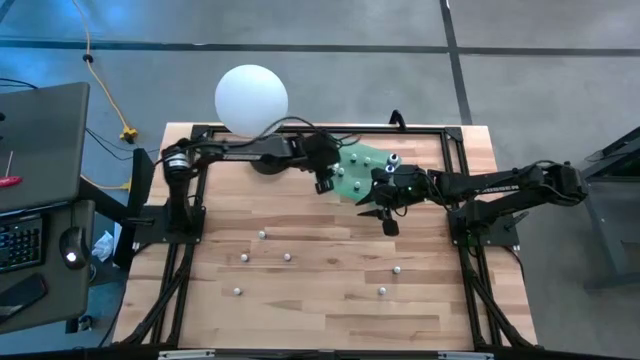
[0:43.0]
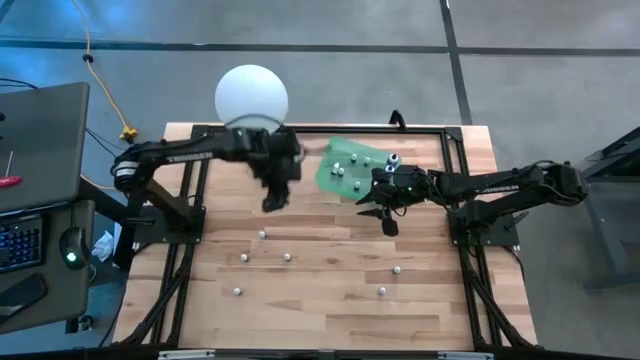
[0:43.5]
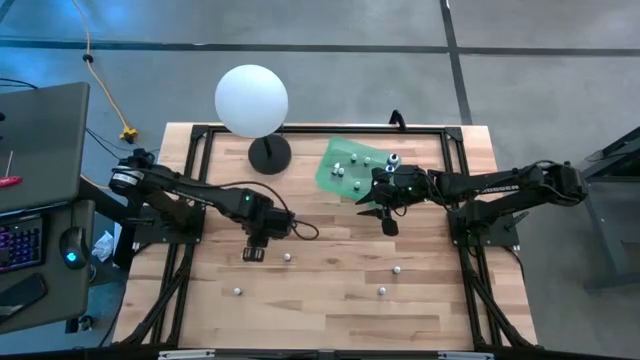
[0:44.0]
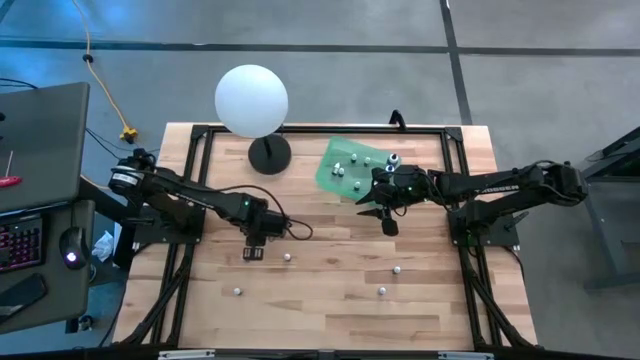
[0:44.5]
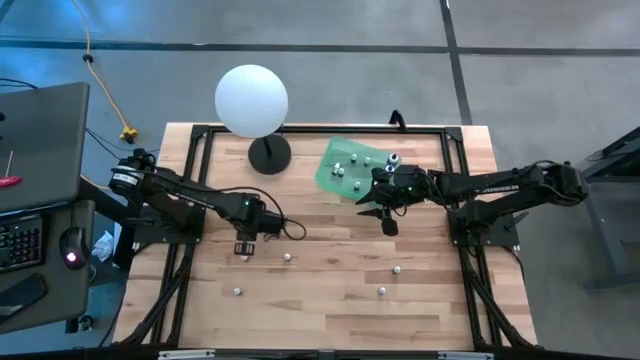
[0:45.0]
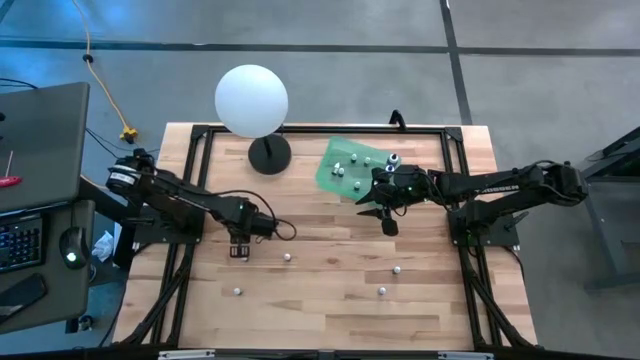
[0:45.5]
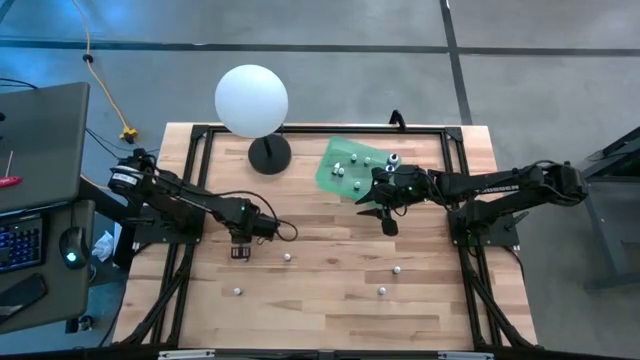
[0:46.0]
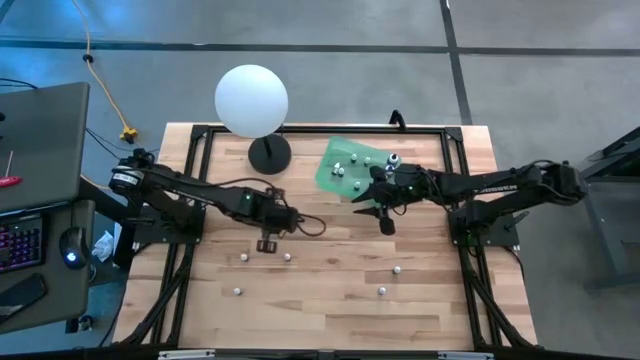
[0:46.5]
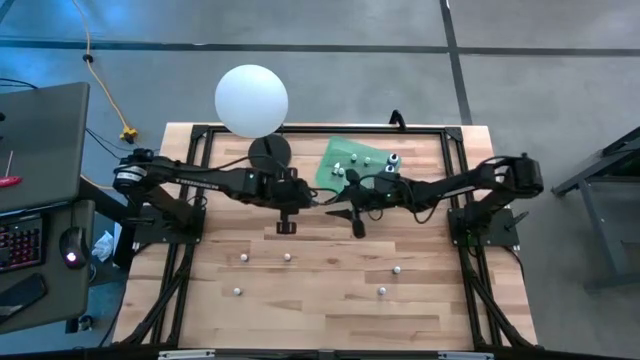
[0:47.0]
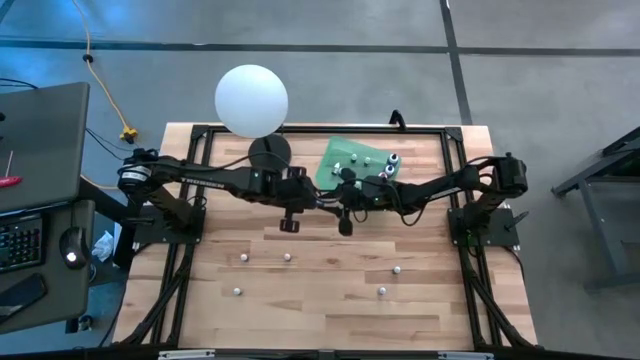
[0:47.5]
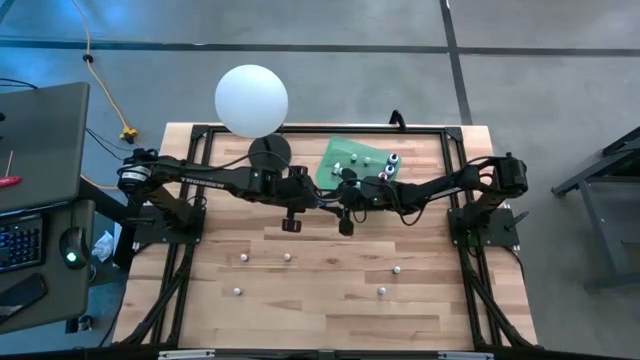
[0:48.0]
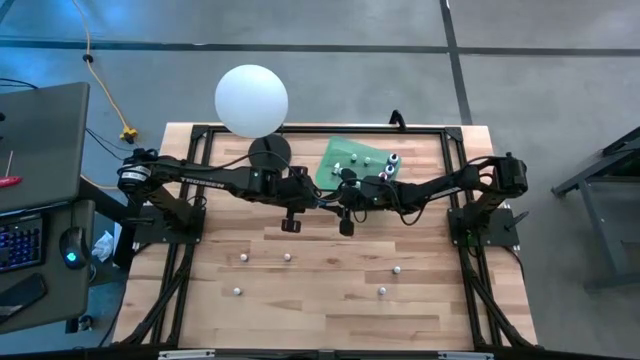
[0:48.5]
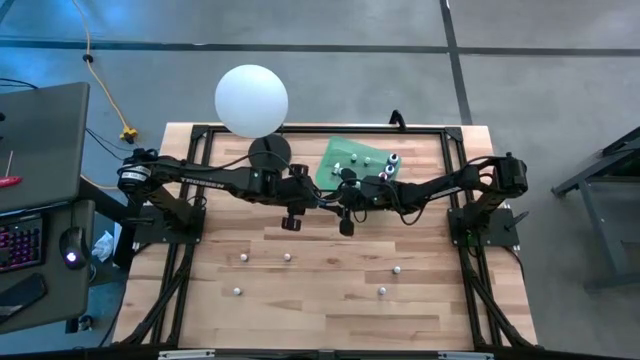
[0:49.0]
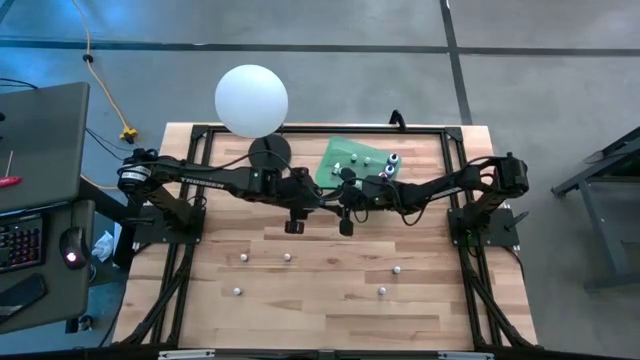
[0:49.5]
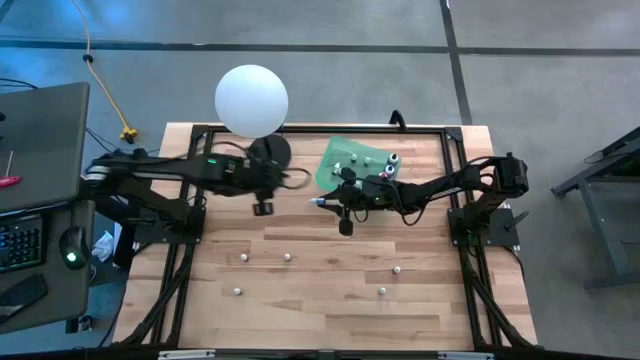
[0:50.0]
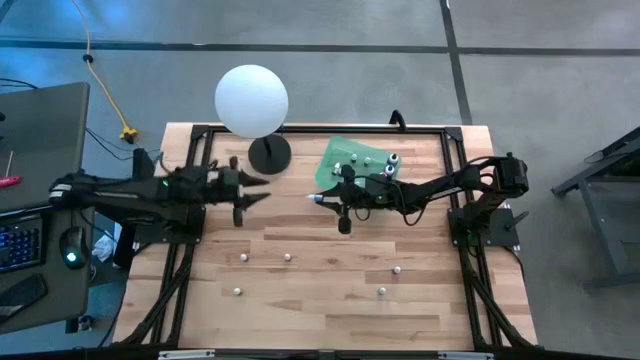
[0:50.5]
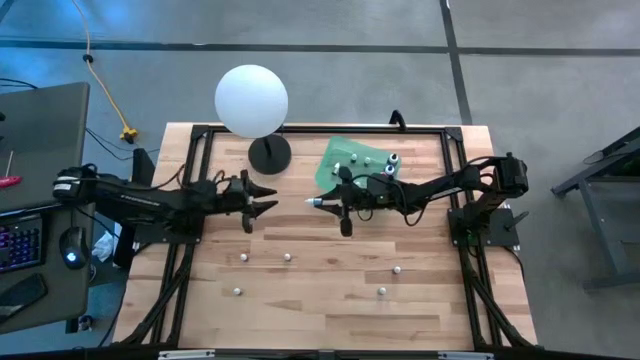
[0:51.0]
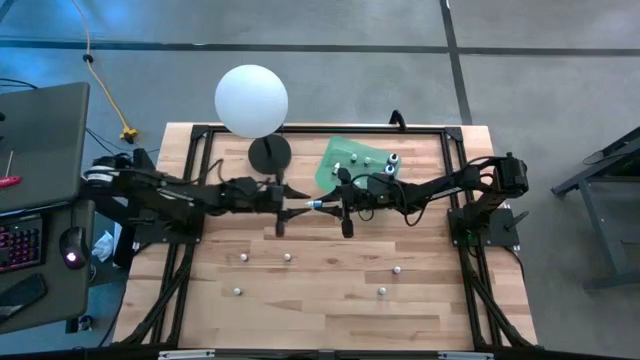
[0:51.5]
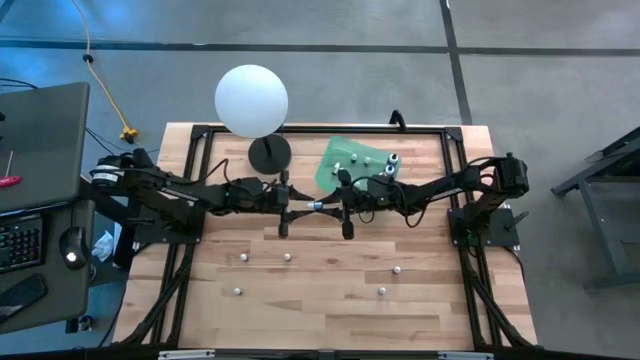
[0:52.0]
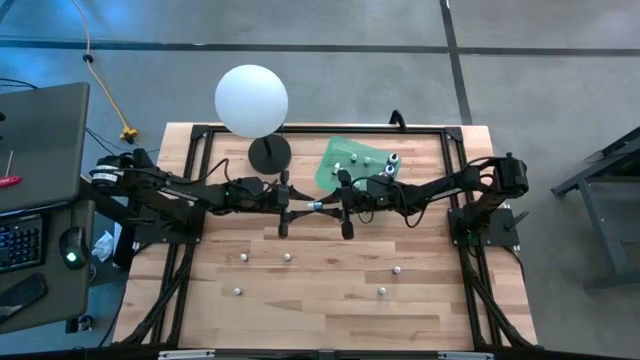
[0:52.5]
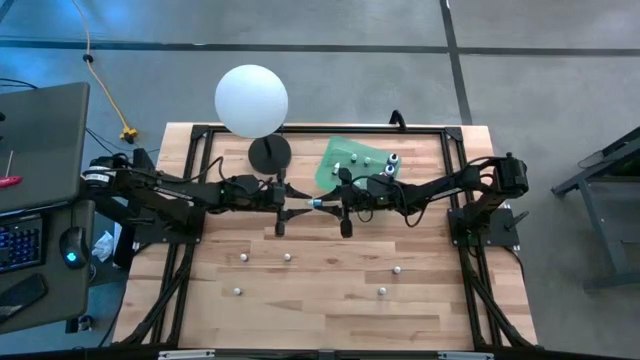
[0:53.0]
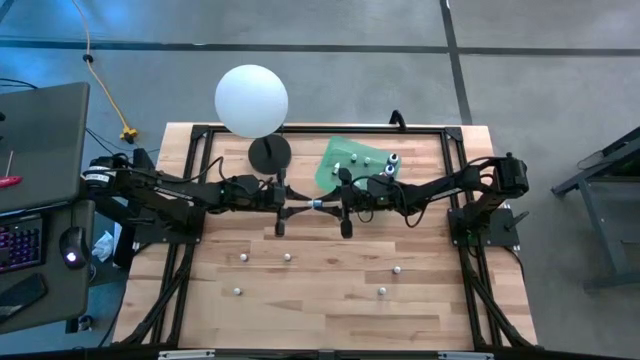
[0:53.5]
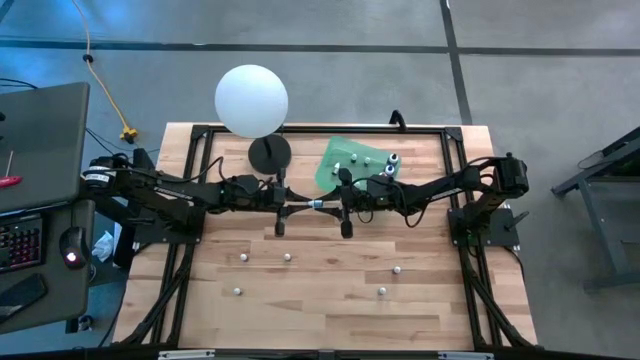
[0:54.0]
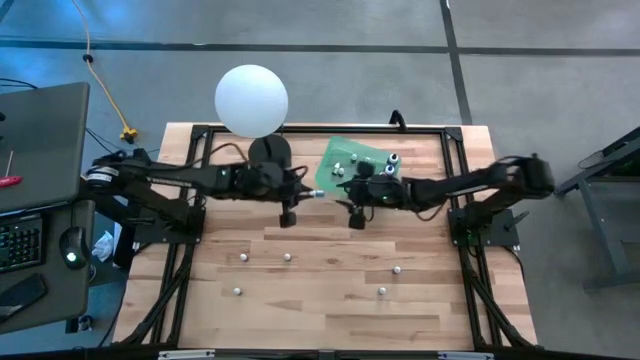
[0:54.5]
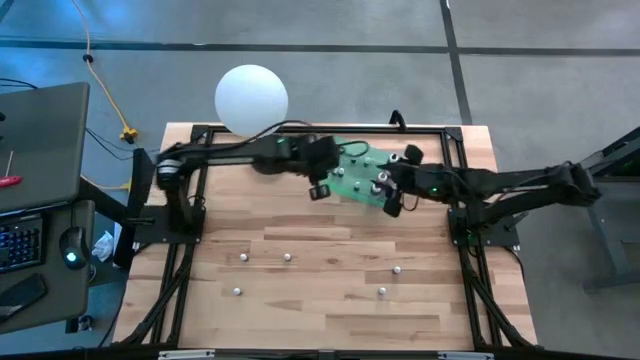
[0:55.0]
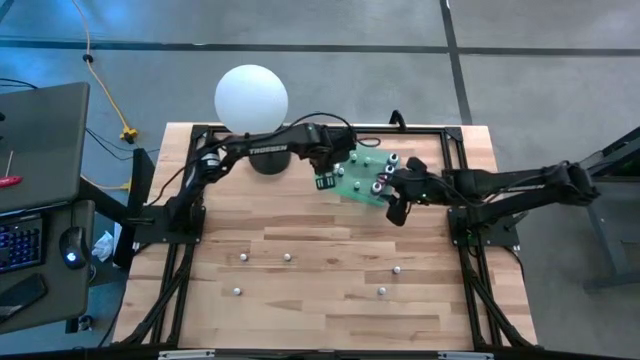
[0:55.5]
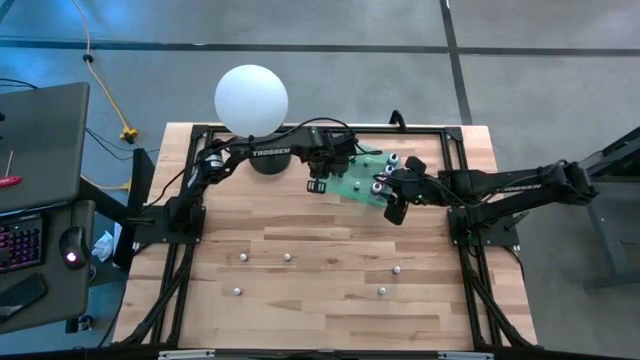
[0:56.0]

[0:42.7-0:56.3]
Task: Pick & Place food coloring
Put the small blue food coloring bottle into the green bin

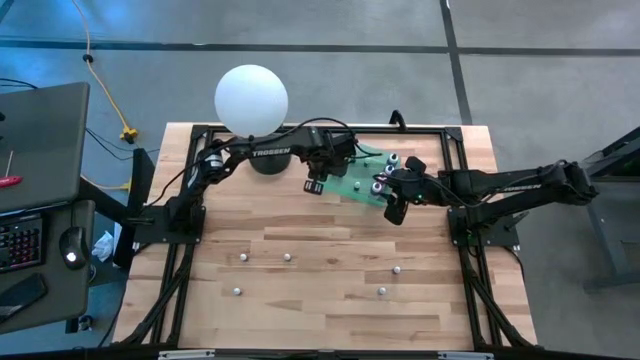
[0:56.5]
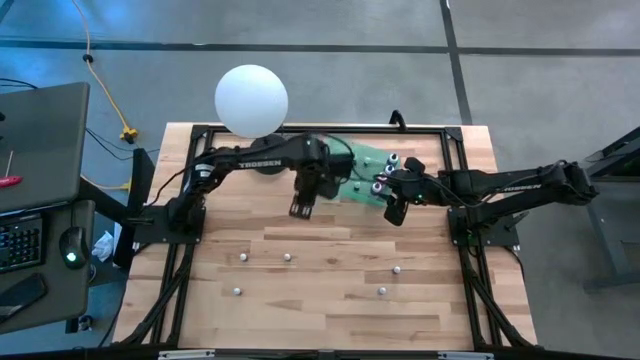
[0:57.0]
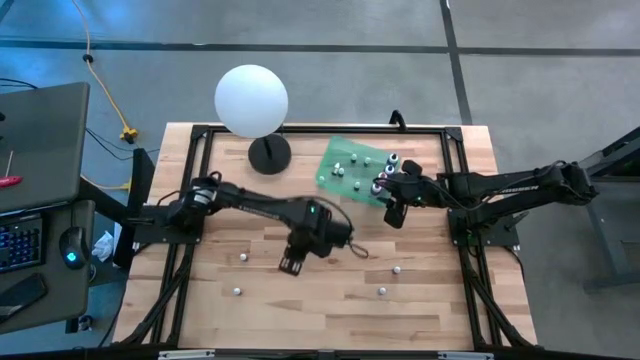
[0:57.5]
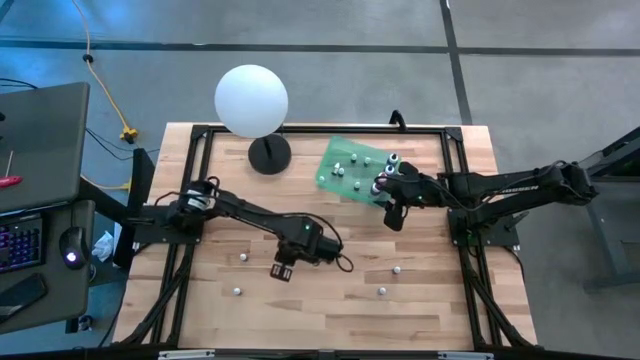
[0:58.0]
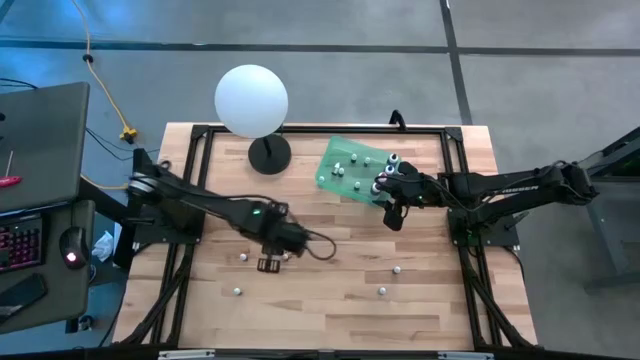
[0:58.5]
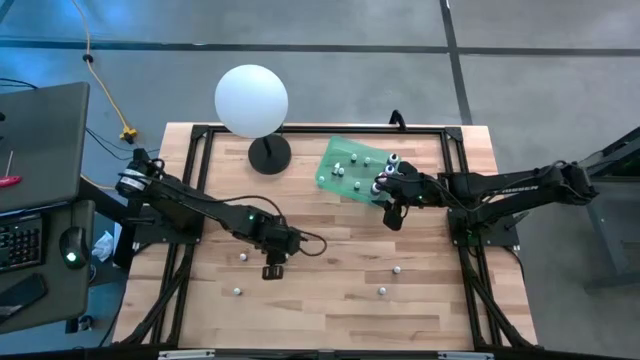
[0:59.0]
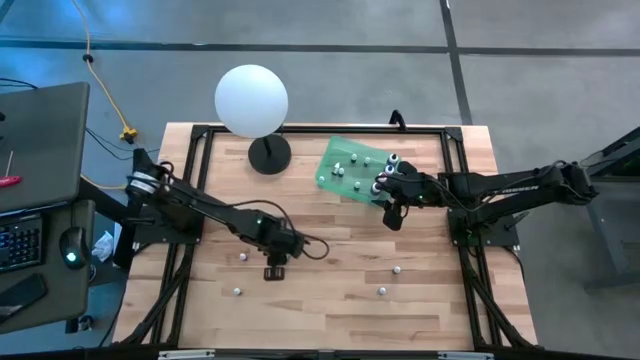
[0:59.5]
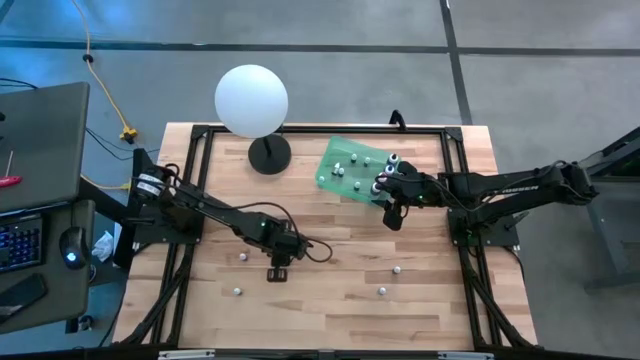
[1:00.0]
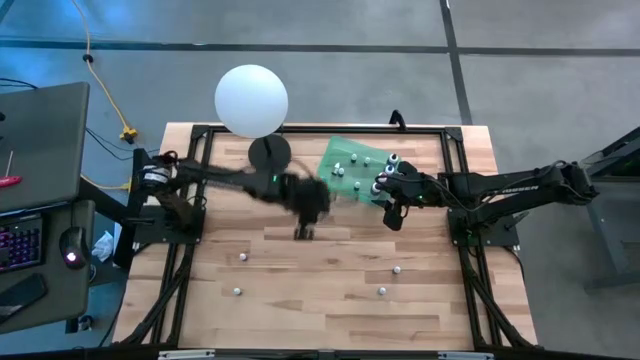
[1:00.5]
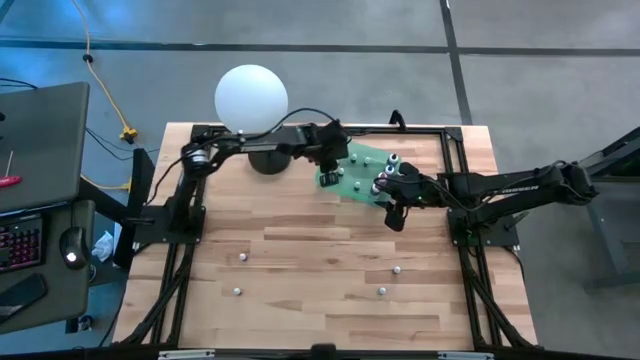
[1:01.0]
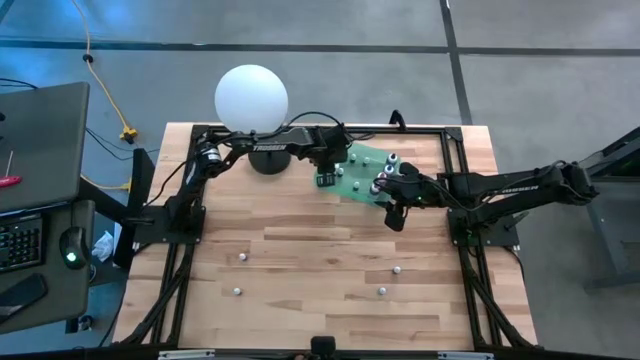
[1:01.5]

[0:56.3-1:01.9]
Put the small red food coloring bottle into the green bin

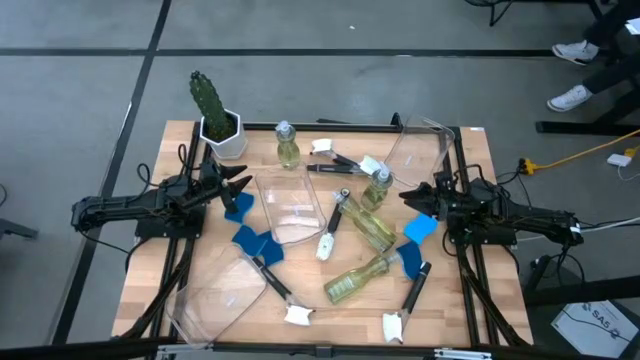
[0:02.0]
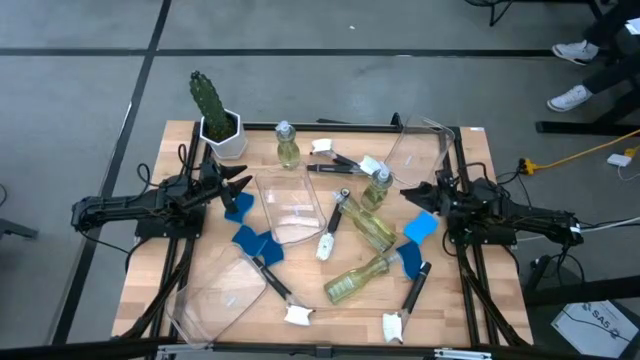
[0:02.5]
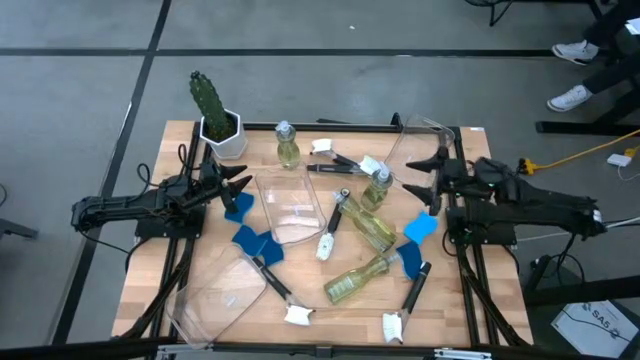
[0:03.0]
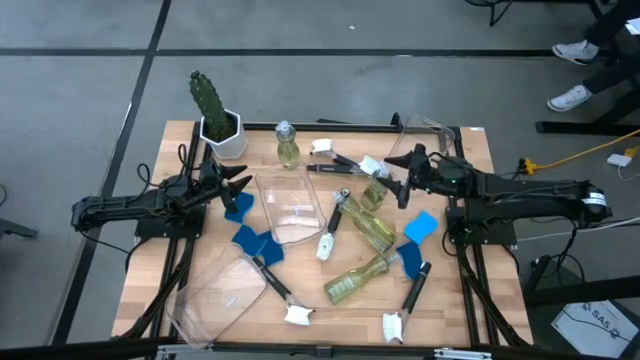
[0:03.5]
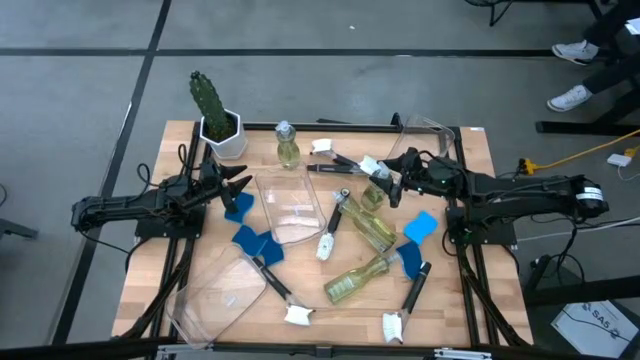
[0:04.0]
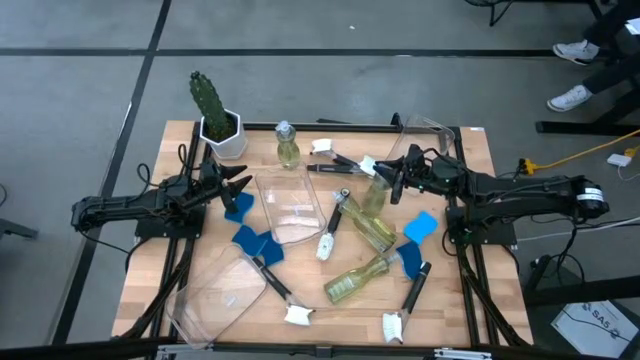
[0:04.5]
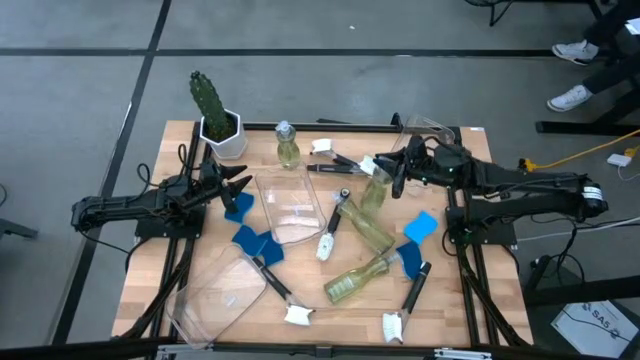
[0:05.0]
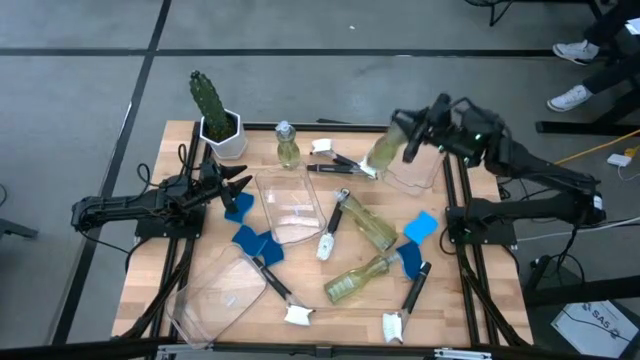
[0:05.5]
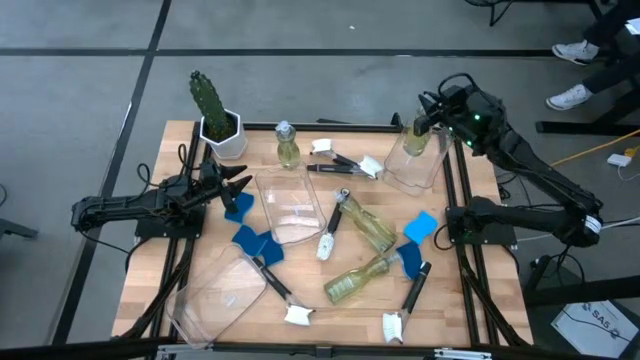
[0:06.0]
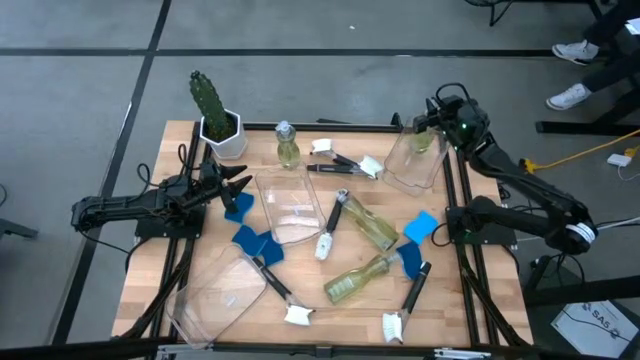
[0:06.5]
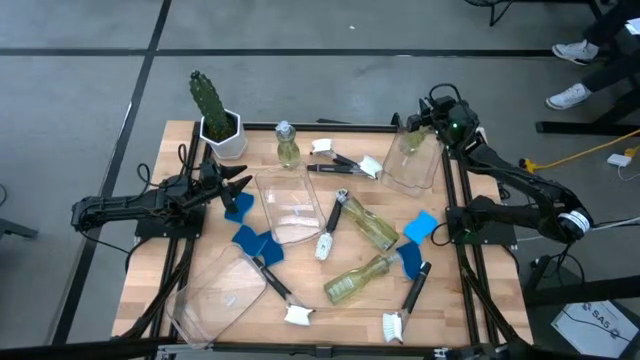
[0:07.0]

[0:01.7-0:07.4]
Task: Pick & Place Kitchen Sink Supplies
Put the green dish soap into the top right transparent bin
